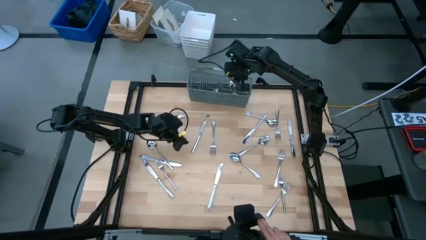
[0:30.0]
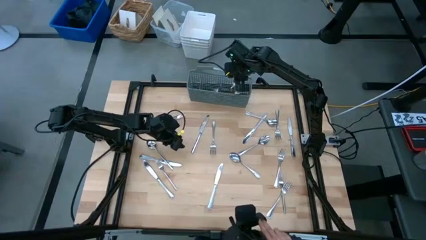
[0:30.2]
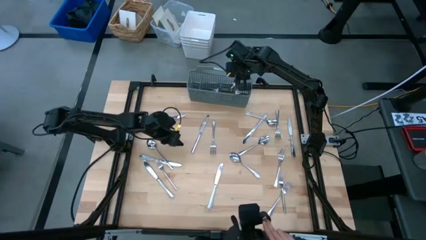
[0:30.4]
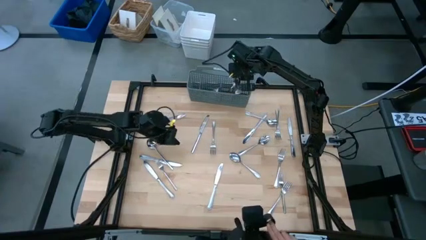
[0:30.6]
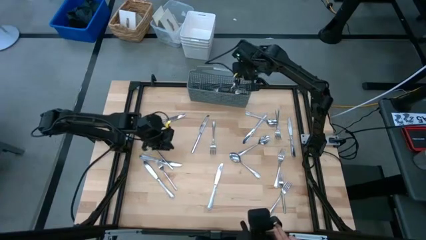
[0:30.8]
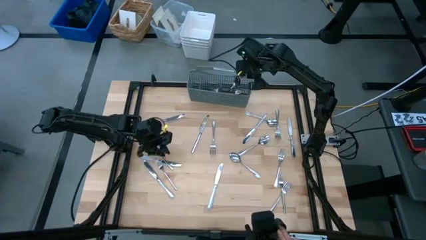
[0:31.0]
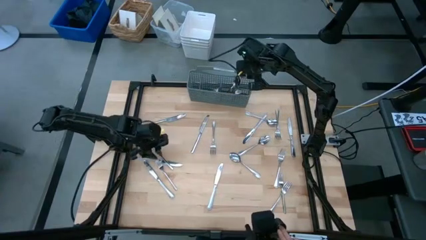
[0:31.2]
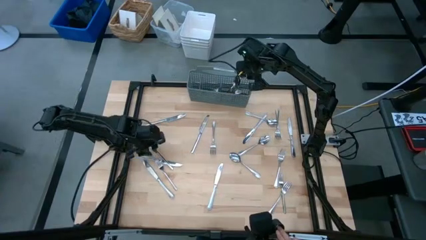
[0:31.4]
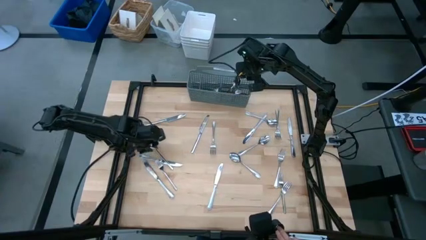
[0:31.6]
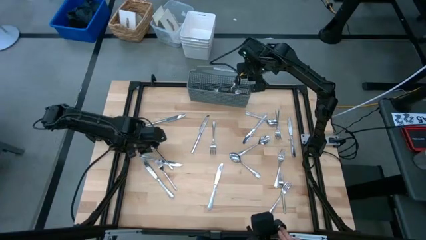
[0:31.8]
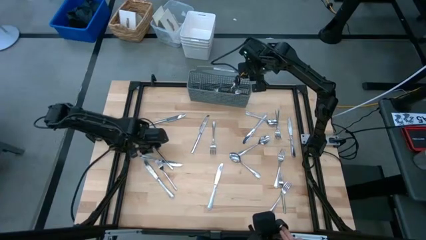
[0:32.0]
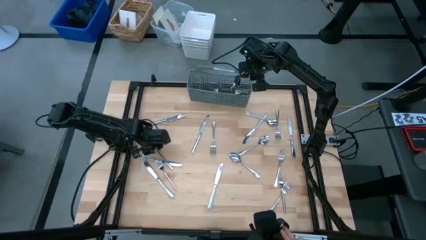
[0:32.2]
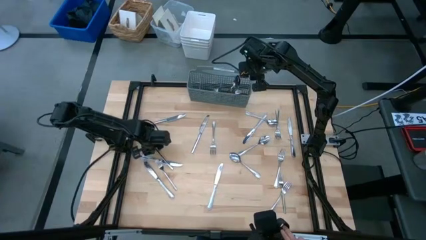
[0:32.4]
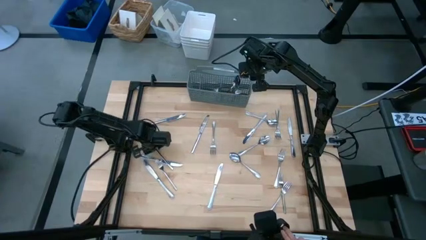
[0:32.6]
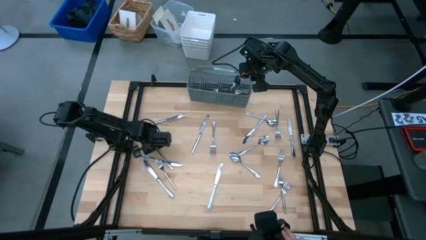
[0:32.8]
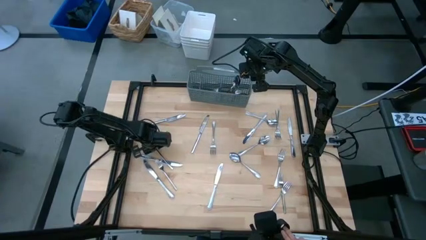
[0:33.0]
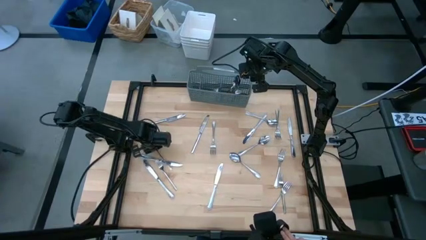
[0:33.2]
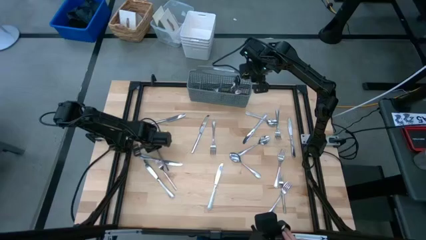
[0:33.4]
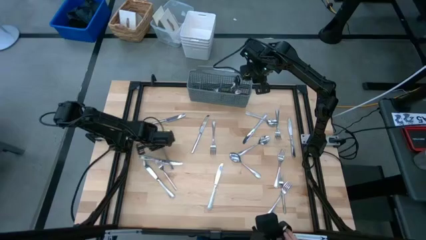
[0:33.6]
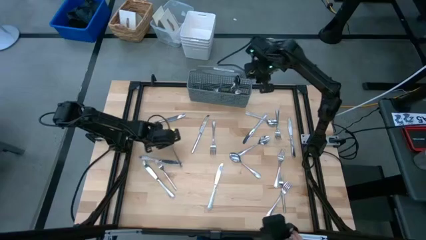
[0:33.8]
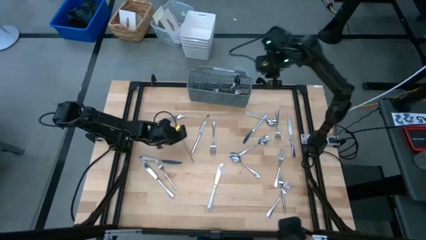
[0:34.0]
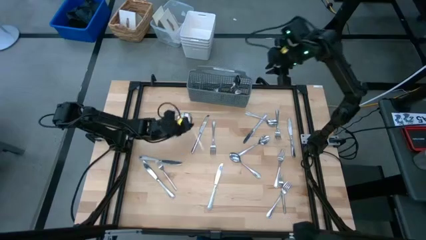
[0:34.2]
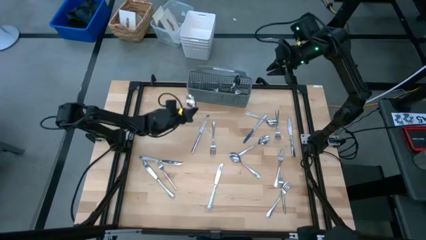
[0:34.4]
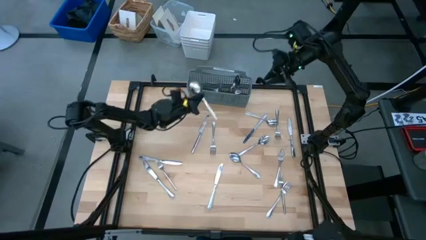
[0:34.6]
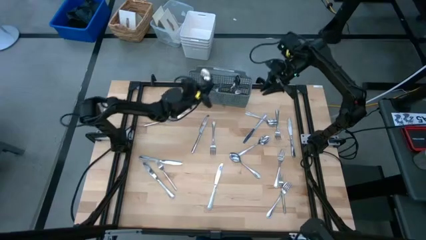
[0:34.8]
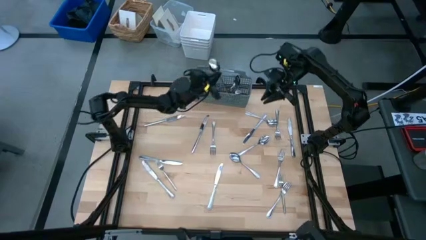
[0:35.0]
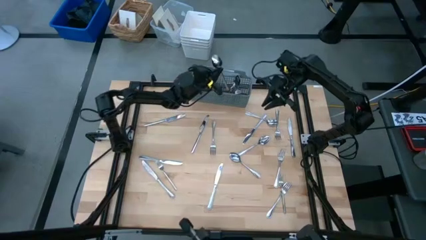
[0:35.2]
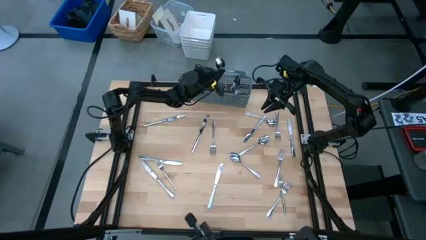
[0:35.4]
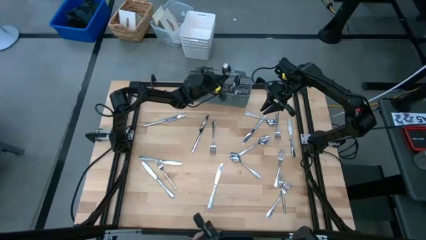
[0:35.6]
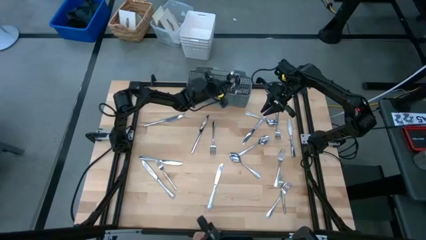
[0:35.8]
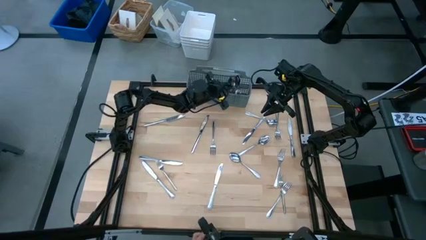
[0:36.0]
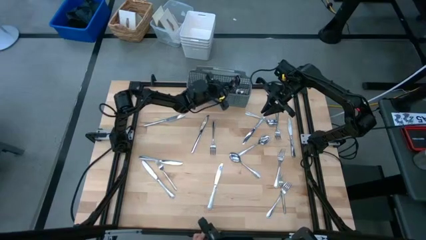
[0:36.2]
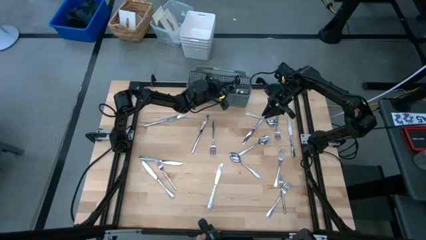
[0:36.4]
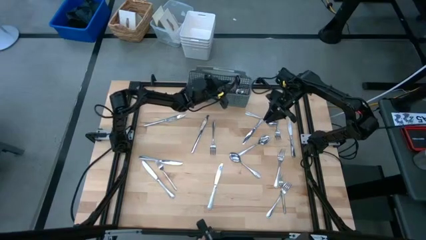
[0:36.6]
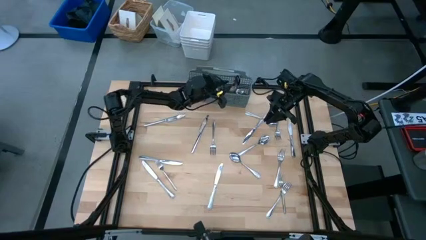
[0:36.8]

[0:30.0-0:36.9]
Task: Sort silverware
Put the spoon into the gray silverware organizer

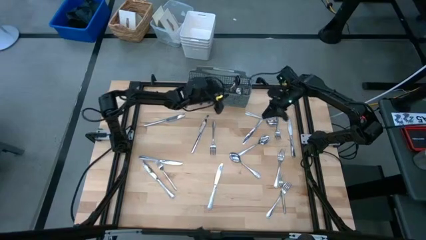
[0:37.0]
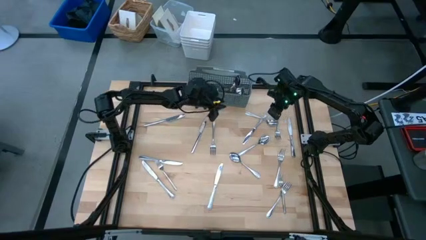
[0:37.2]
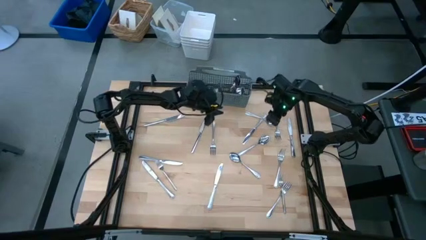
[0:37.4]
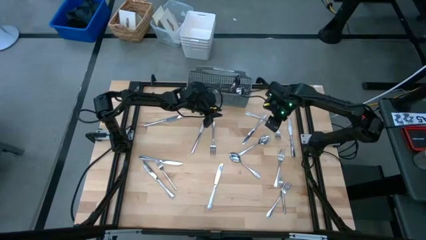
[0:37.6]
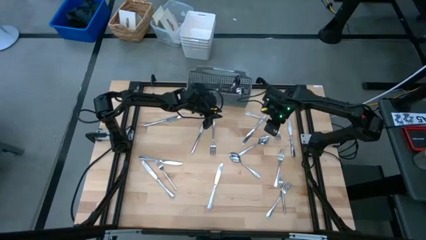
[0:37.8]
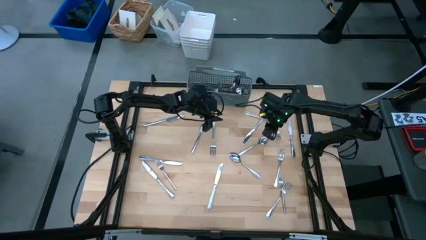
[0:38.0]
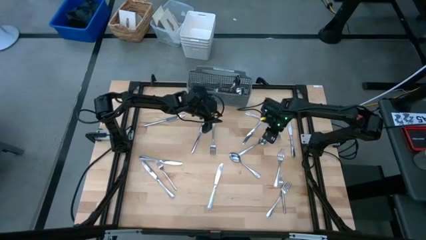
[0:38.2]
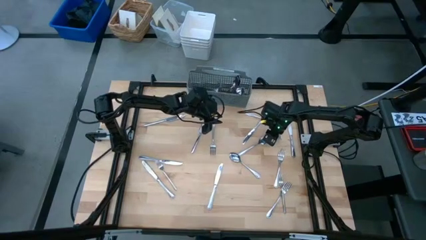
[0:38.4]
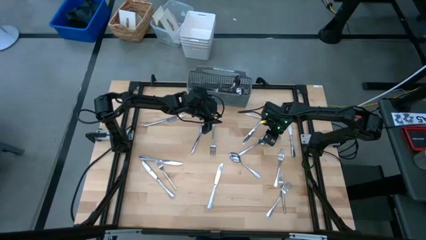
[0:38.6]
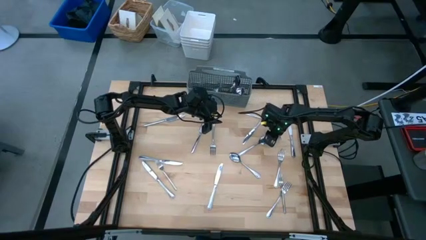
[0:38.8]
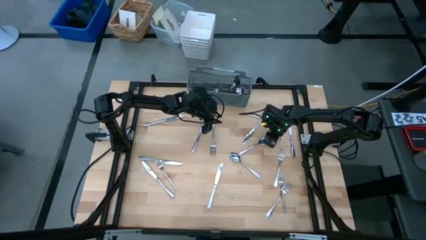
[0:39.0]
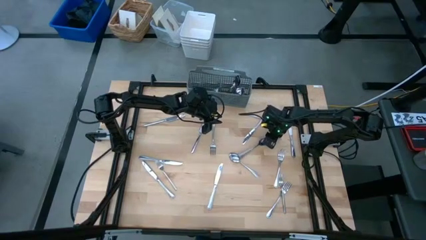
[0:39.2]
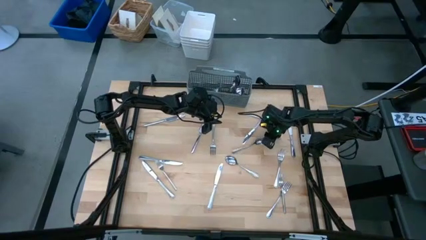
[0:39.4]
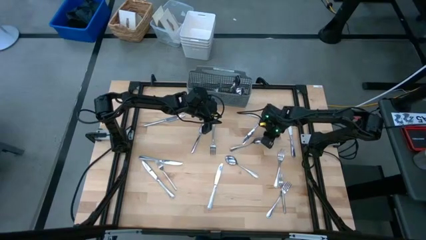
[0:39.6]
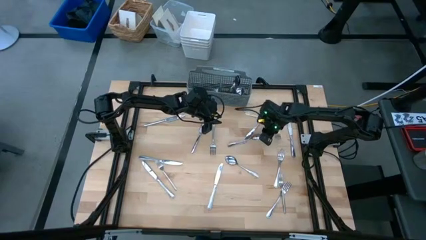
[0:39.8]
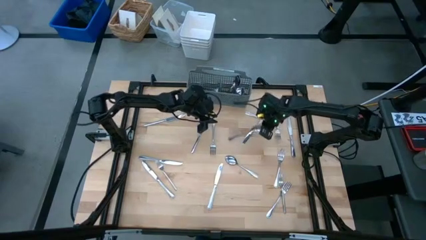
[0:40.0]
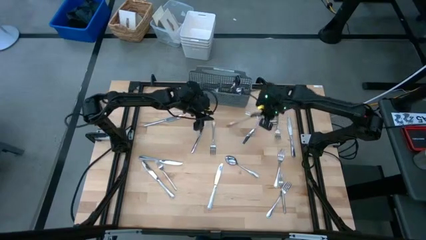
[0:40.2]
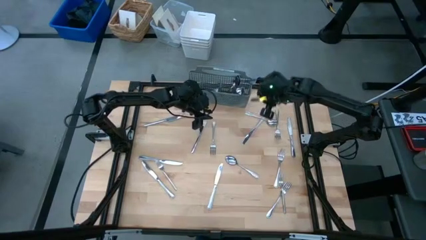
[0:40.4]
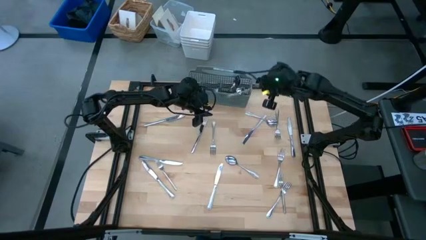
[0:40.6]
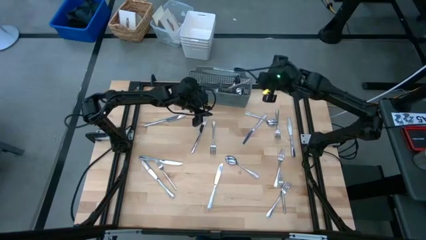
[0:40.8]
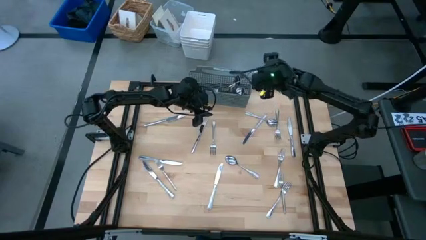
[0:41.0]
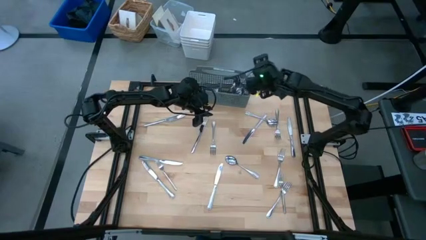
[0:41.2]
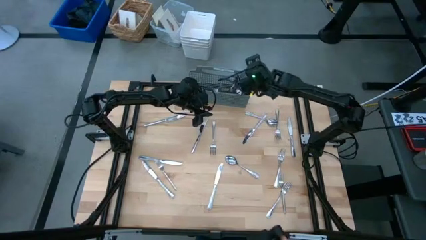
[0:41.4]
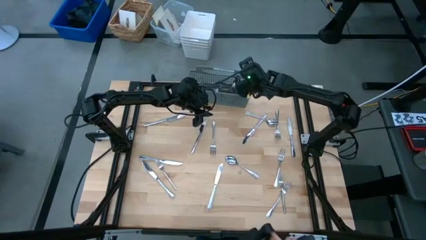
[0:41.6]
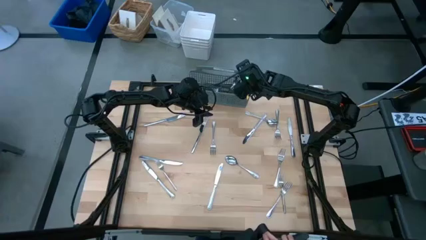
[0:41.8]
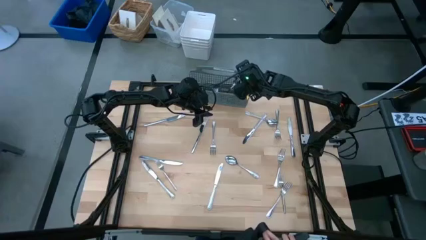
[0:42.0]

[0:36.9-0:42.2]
Put the spoon into the gray silverware organizer

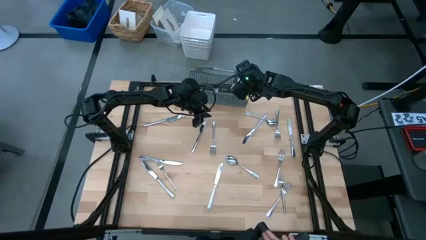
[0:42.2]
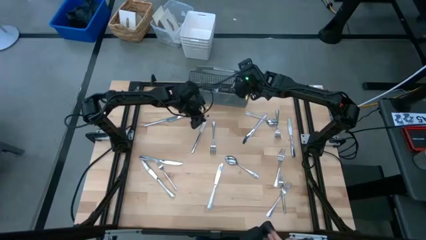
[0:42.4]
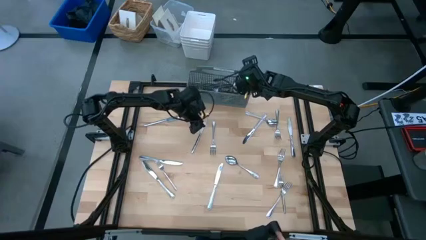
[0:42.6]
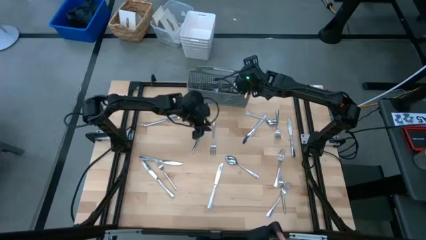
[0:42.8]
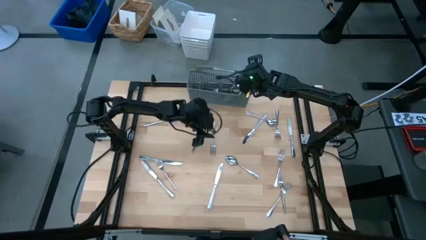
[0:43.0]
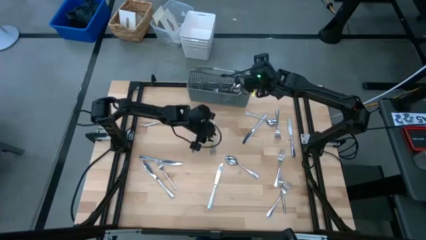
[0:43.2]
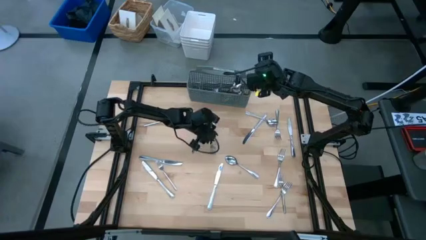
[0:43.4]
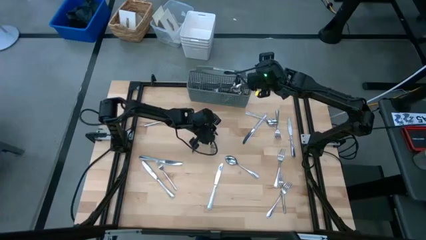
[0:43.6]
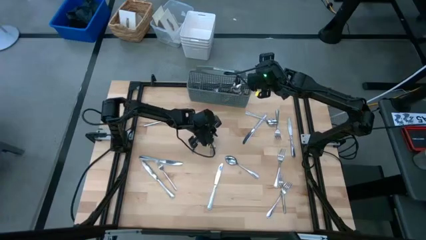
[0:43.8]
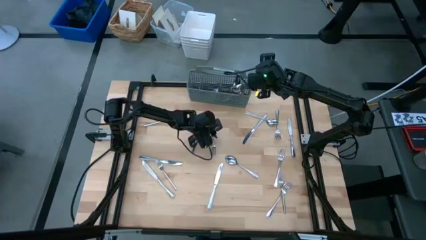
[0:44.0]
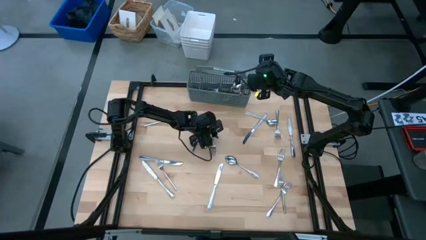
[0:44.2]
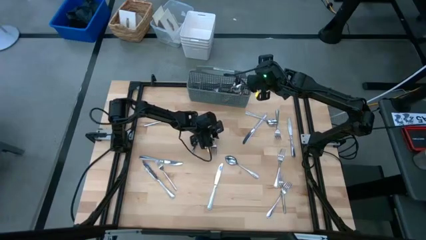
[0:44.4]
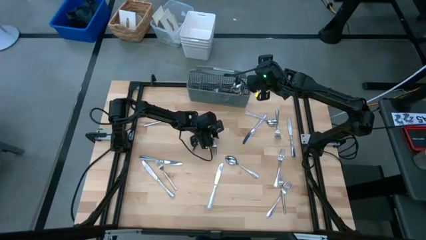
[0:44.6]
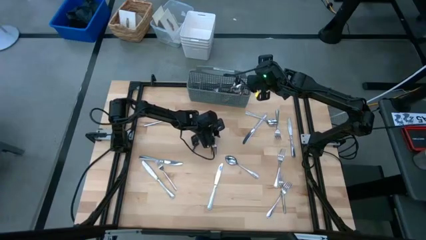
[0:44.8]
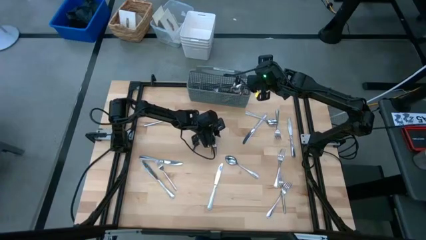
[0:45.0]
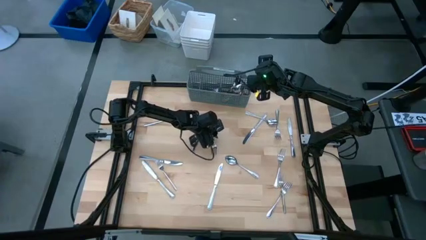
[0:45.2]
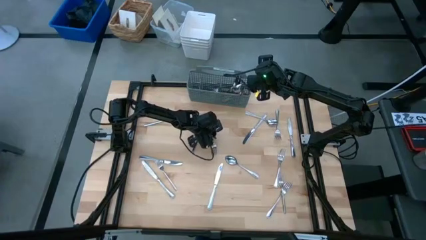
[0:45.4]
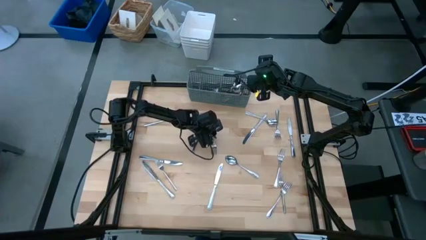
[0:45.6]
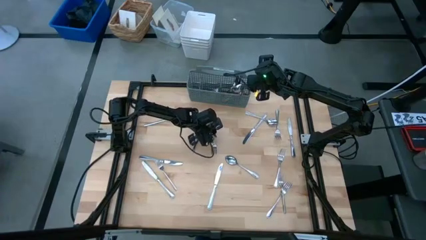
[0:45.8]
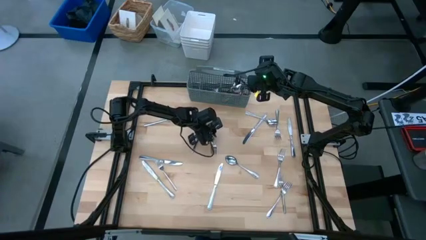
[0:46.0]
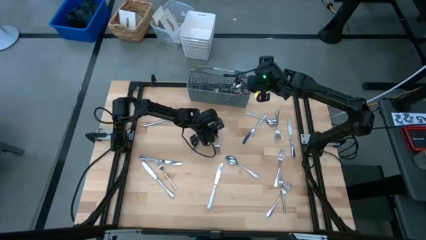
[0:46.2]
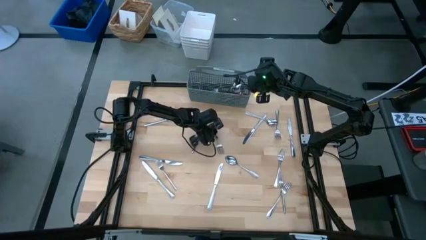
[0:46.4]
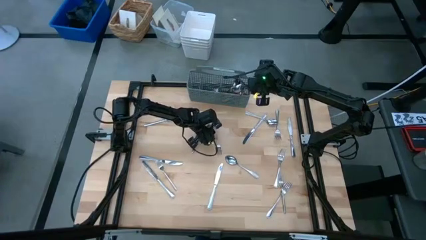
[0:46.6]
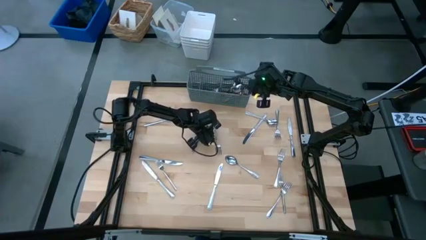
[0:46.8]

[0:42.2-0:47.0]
Put the fork into the gray silverware organizer

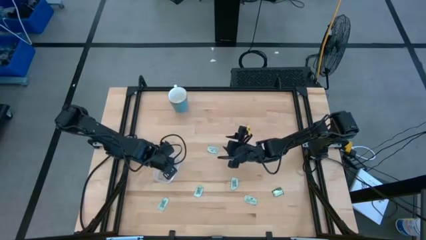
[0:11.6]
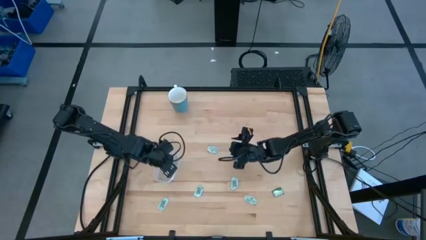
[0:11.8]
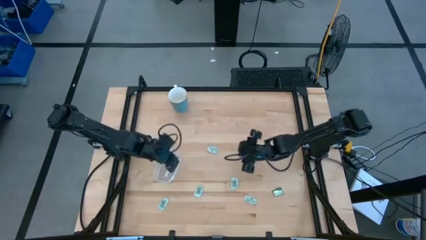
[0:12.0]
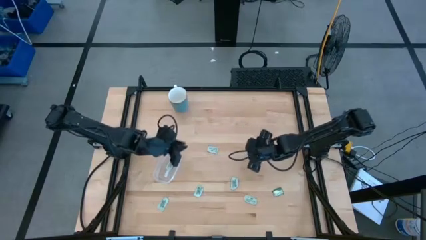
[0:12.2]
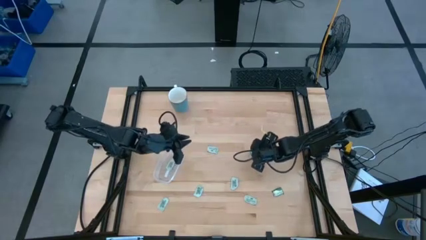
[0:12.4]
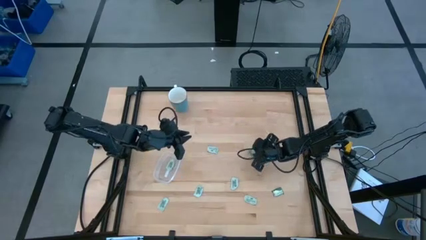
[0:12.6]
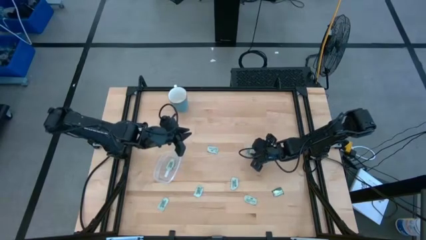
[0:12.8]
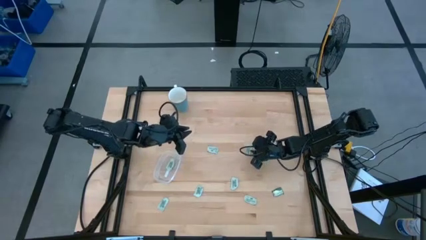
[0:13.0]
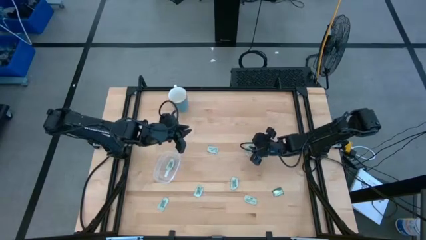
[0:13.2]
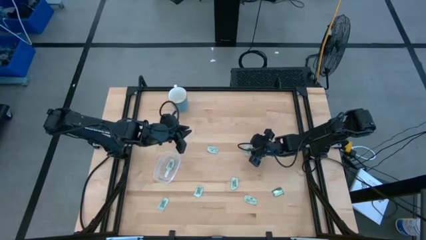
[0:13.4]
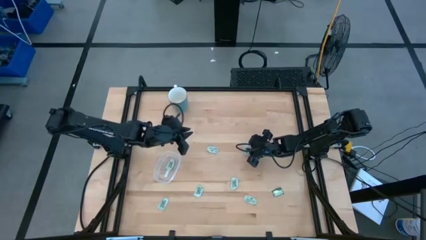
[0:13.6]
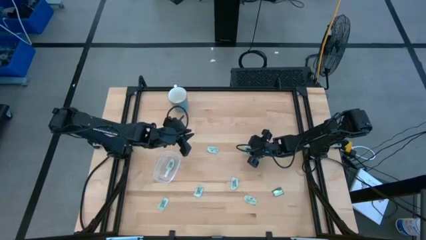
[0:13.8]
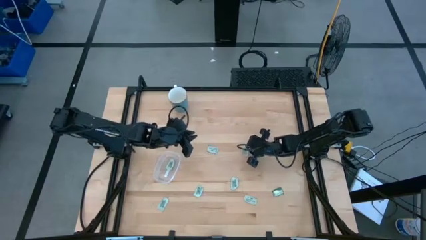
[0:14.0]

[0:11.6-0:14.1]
Task: Pick and place Stevia / Truvia into bins
Put the stevia packet into the transparent container
